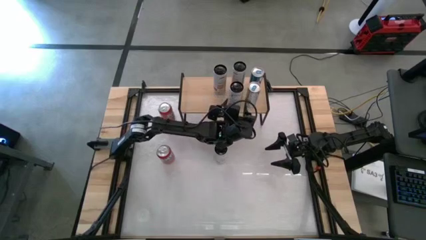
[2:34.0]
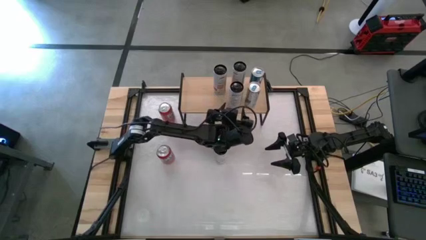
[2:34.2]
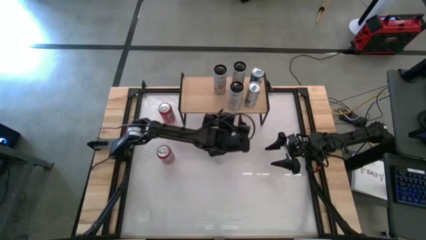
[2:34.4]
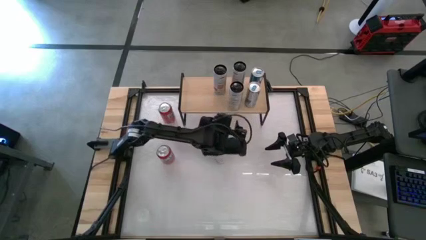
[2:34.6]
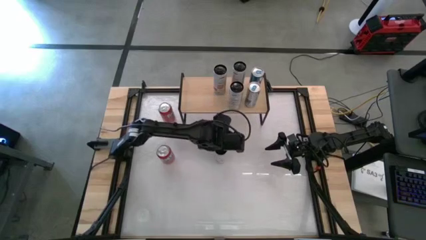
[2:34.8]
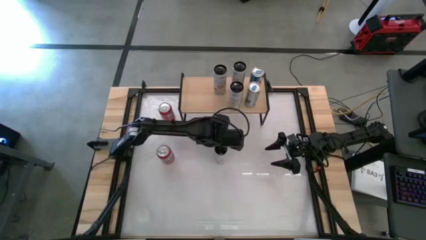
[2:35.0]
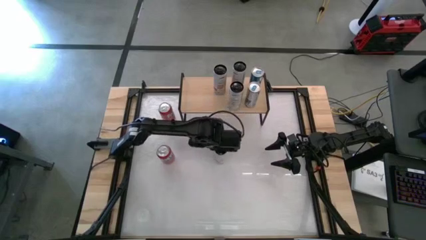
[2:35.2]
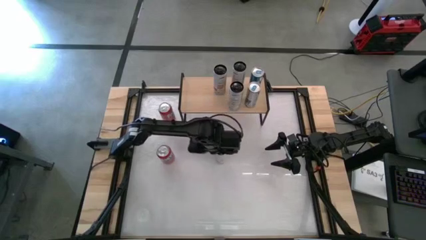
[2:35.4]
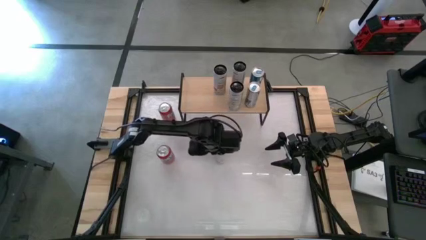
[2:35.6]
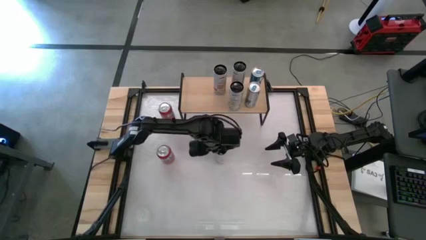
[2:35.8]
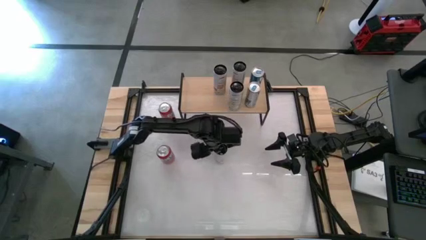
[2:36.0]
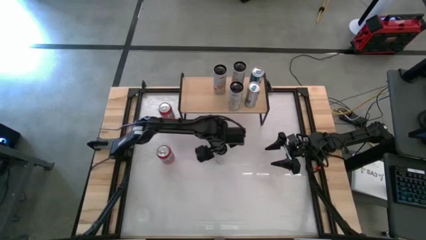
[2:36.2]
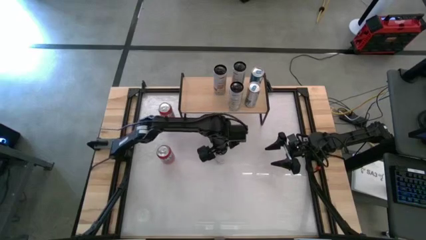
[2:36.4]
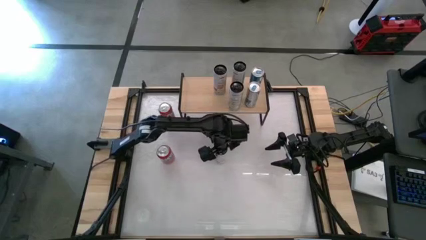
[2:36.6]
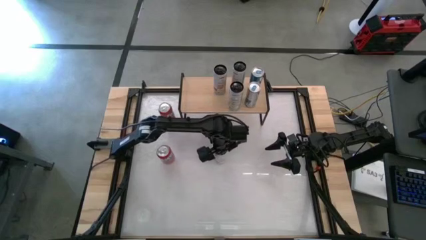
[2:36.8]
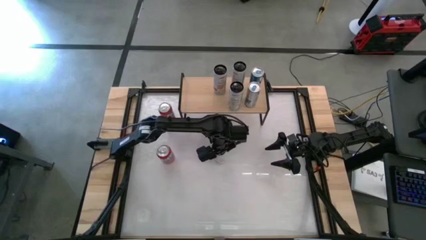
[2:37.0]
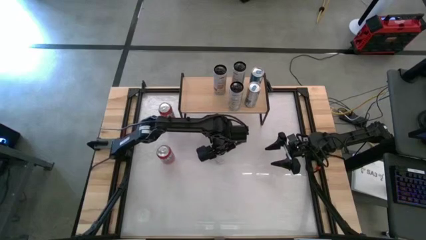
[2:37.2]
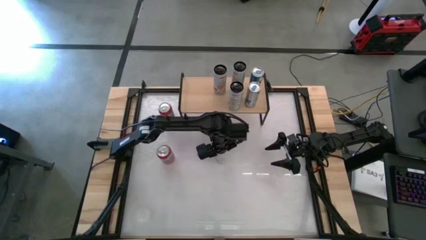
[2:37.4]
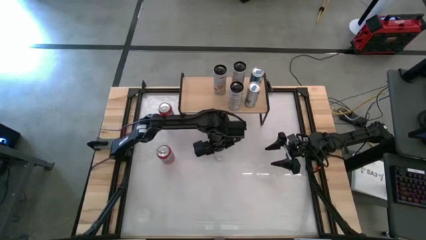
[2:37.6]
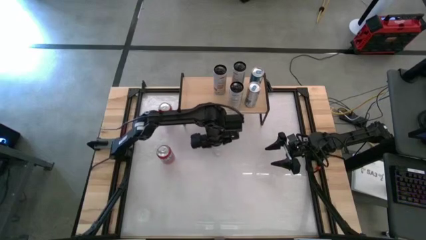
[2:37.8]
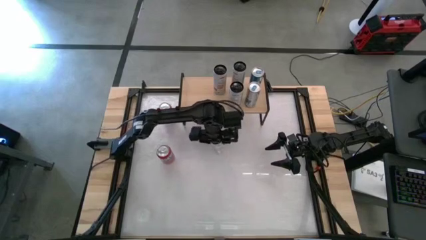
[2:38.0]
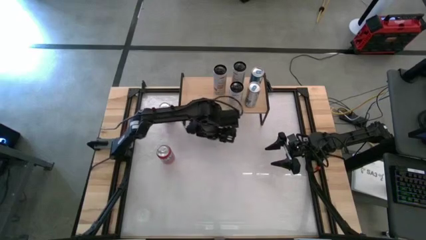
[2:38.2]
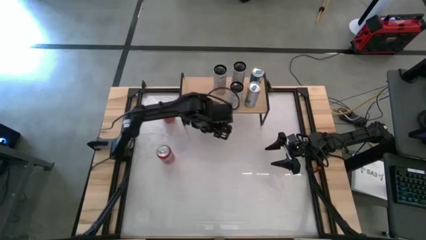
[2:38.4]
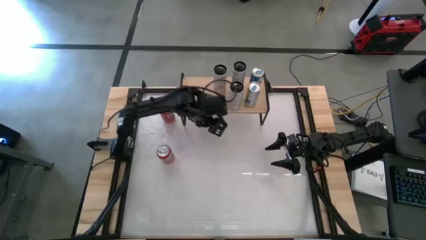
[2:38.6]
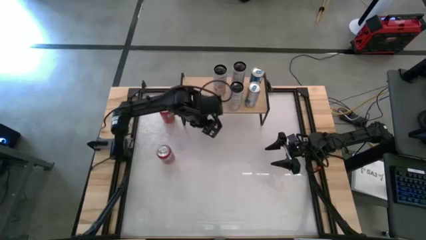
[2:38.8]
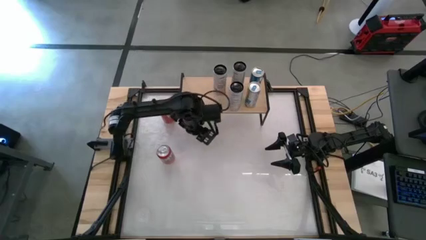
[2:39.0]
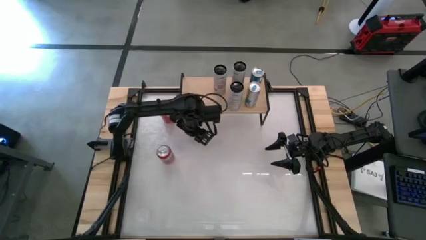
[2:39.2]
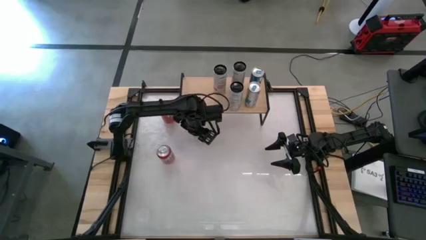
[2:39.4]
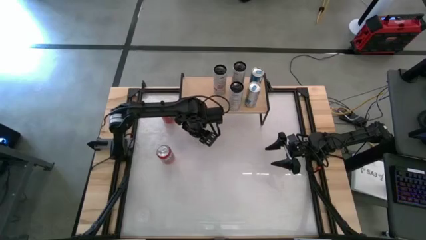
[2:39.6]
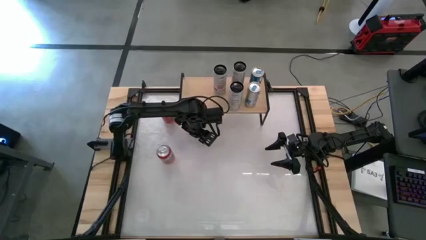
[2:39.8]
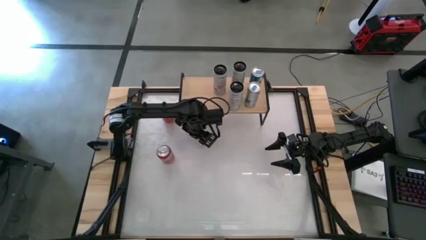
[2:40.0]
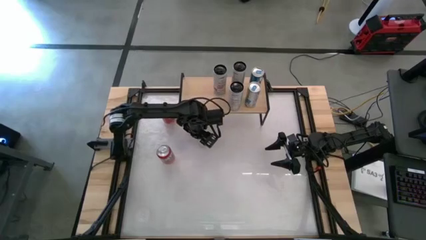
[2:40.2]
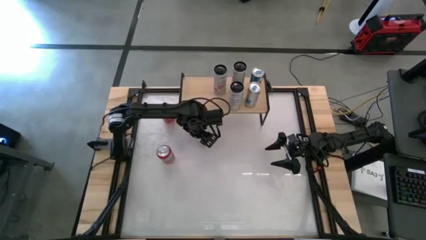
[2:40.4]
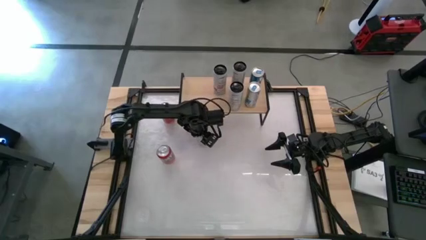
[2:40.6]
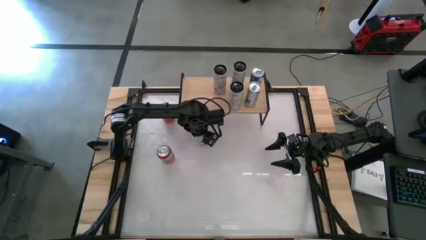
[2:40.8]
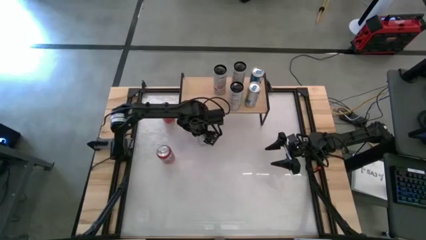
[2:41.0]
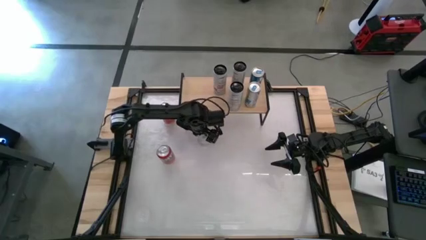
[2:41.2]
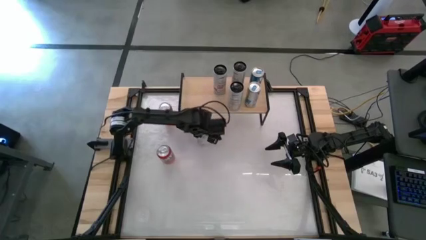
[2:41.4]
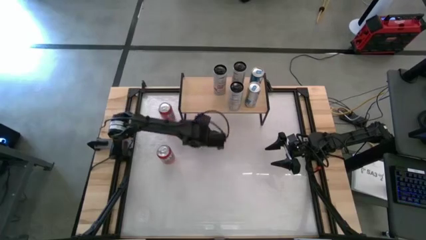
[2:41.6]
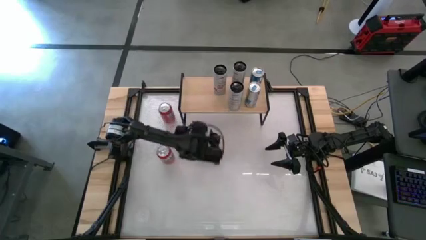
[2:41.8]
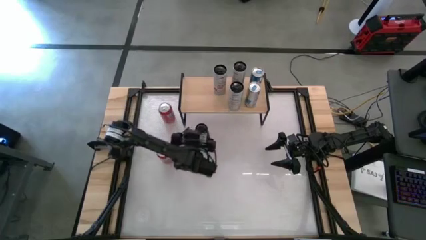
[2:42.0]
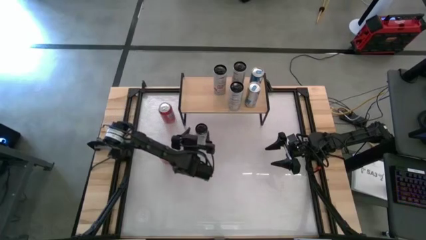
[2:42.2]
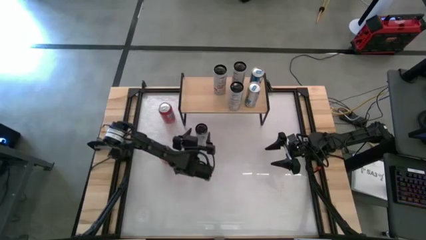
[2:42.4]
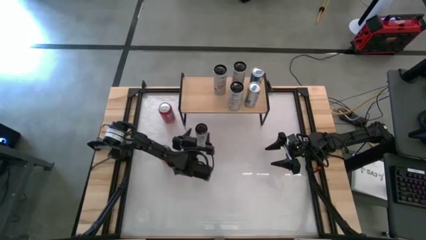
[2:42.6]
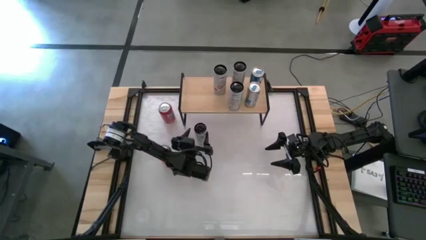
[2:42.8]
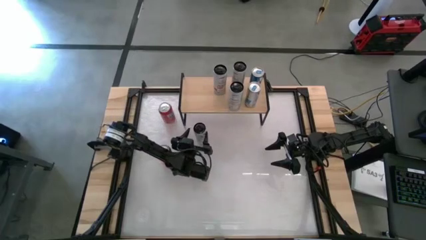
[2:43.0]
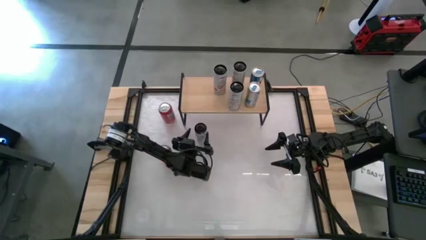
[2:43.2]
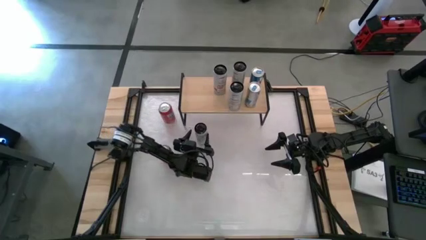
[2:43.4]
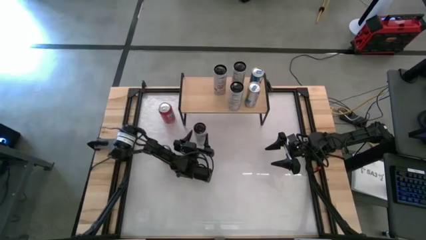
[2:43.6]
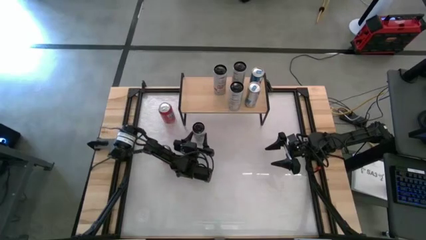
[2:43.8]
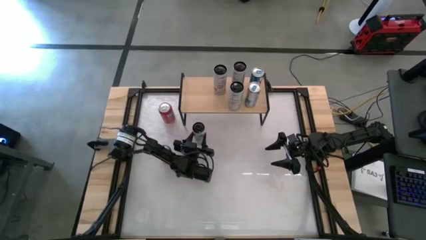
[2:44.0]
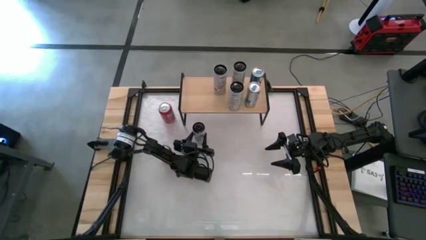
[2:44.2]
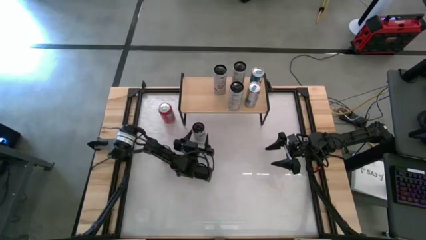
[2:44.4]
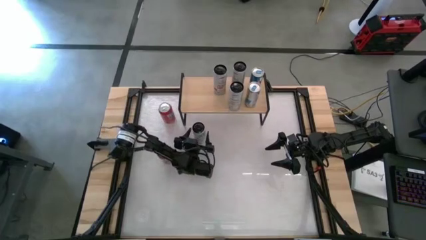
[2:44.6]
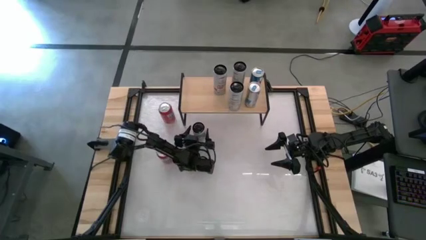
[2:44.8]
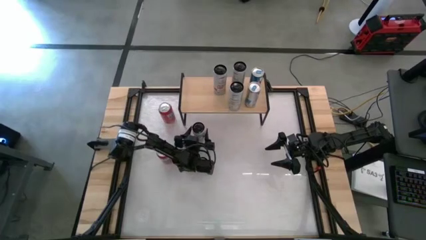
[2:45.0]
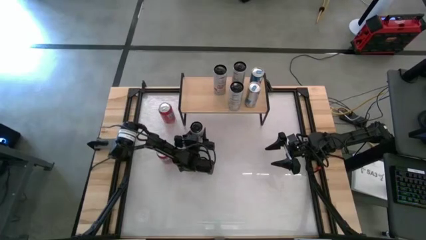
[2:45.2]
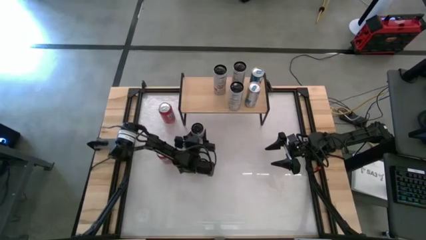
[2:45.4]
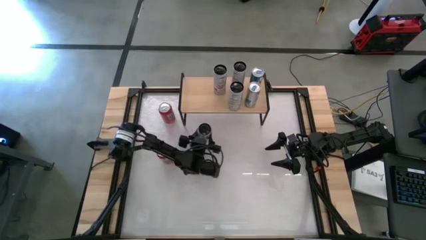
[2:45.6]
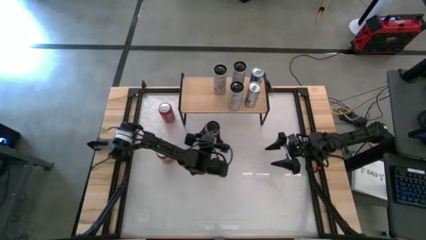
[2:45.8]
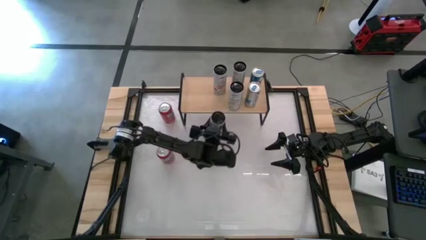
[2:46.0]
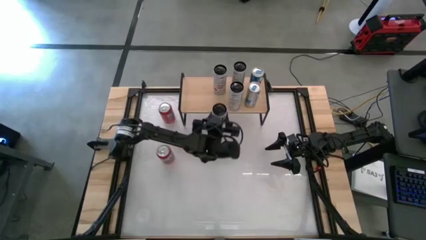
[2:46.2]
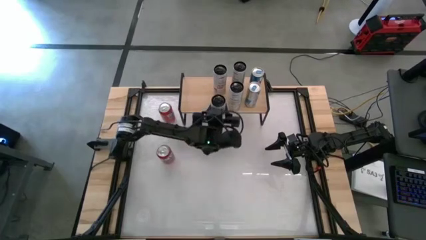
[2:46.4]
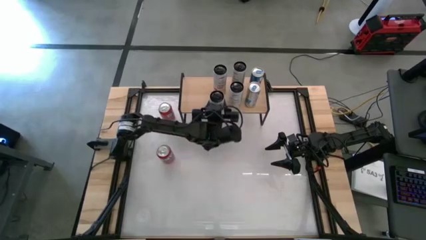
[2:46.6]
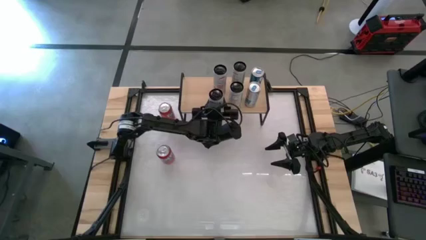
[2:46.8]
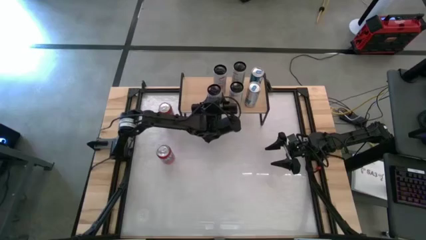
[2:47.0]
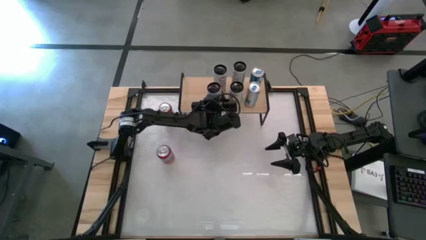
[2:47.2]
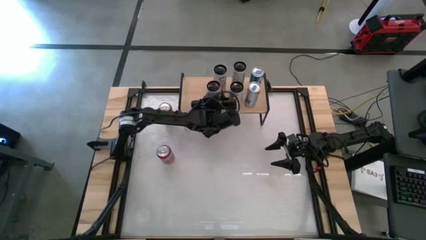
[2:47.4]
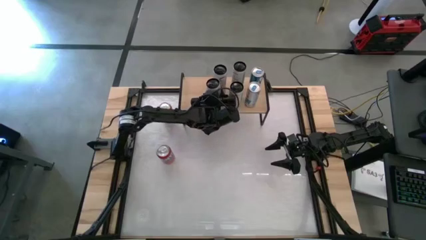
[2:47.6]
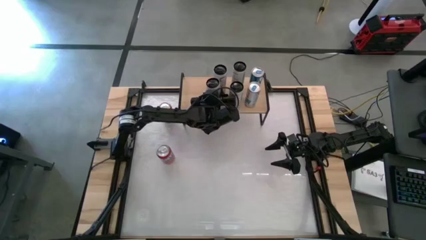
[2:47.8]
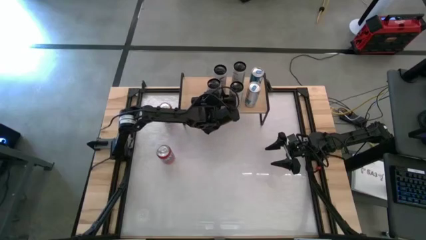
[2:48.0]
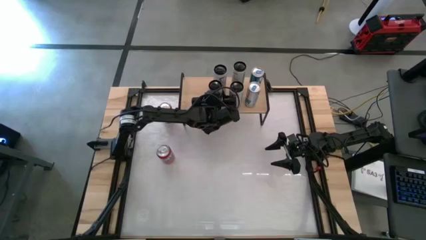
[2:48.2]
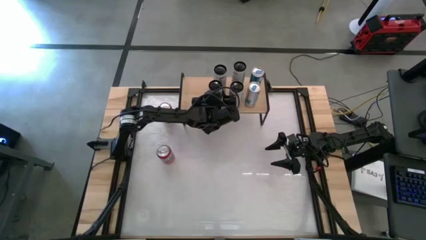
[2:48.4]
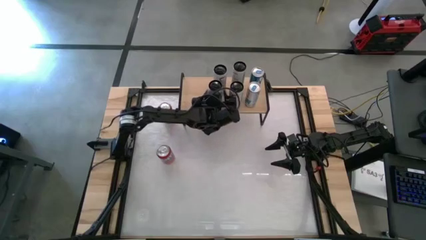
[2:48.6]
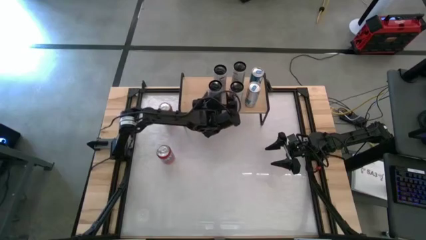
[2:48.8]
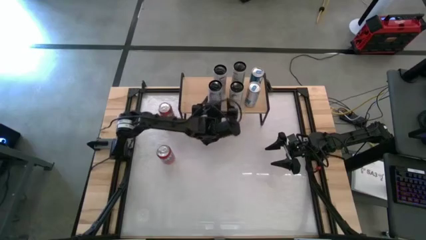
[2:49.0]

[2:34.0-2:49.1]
Task: Place canned beverage on shelf
Put the white pink soda can on the shelf aligned with the other white pink soda can

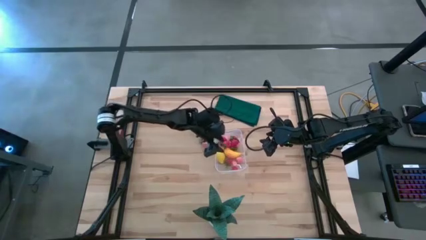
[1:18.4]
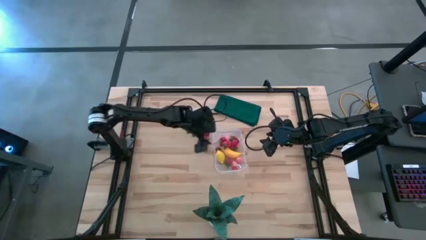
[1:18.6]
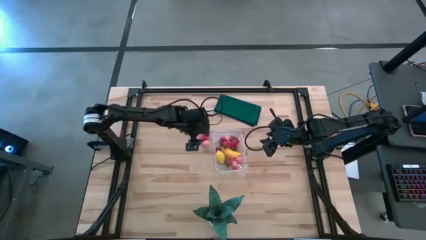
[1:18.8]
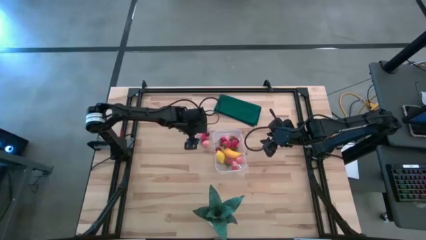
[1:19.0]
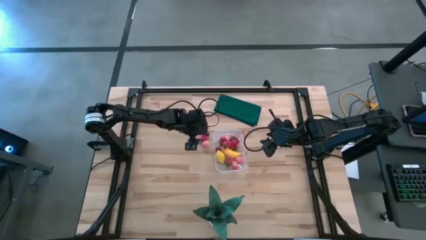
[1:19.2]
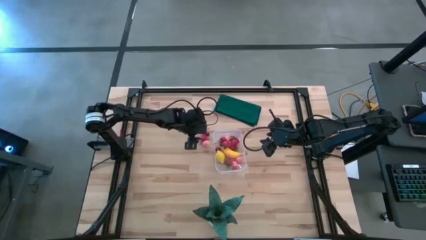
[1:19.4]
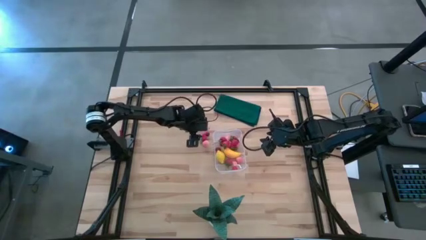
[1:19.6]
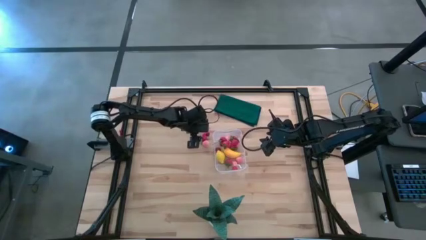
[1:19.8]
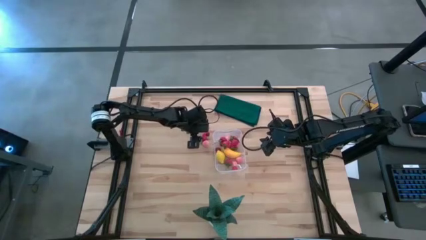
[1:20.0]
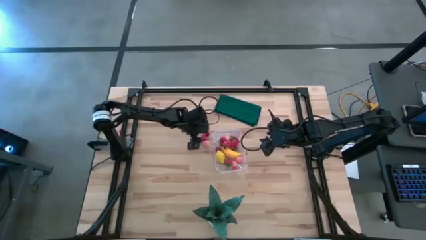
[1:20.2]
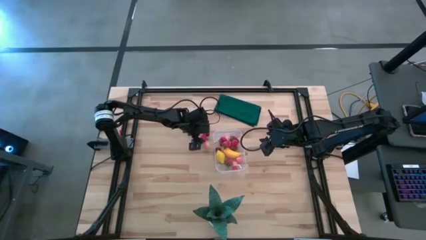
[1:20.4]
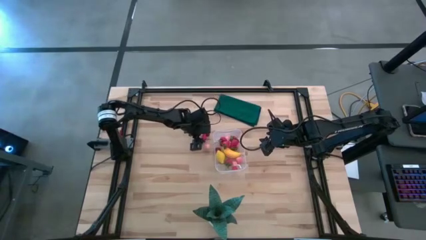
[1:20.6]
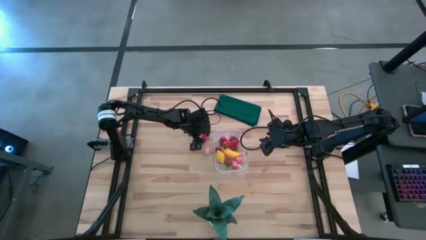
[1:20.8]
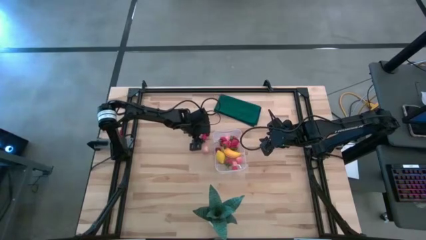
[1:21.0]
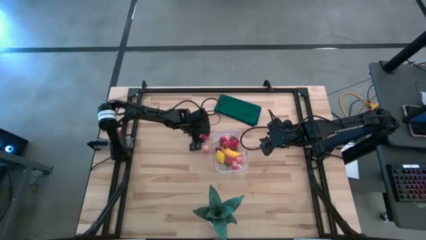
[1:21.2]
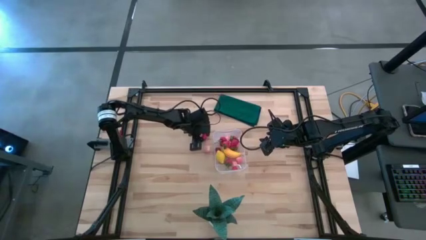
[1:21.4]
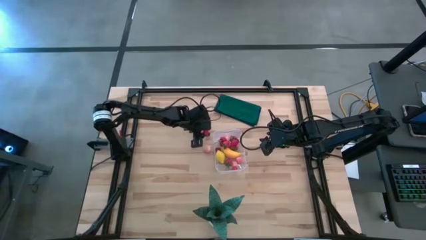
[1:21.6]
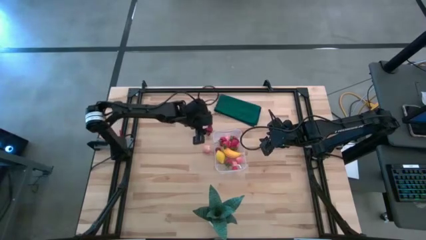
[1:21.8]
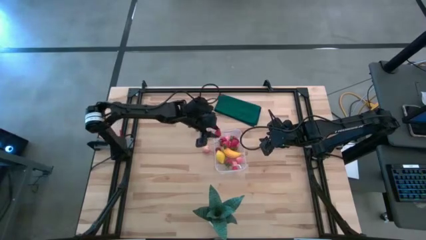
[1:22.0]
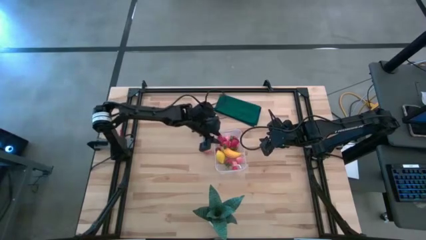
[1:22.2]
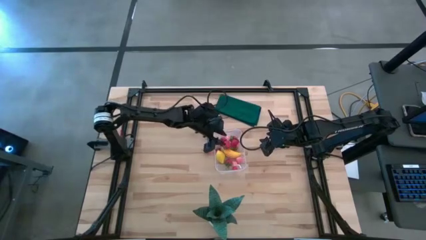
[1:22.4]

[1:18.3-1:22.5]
Task: Pick and placing Produce into tupperware
Put the strawberry into the transparent bin
